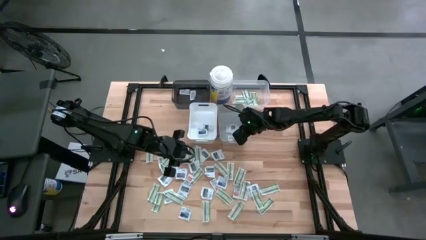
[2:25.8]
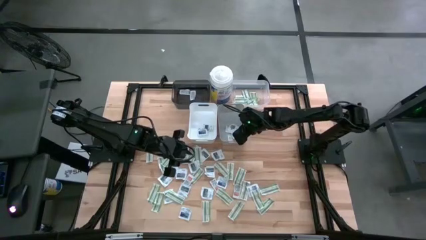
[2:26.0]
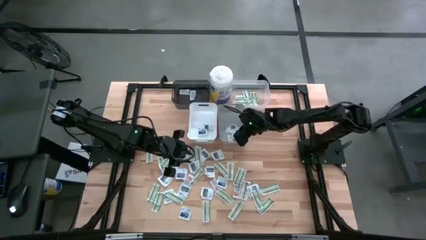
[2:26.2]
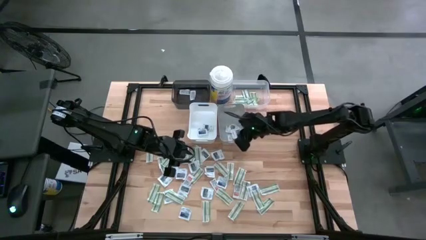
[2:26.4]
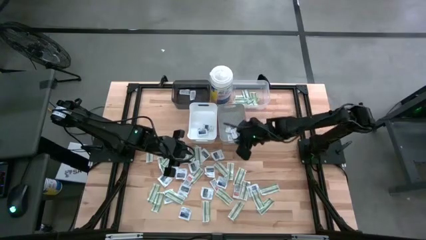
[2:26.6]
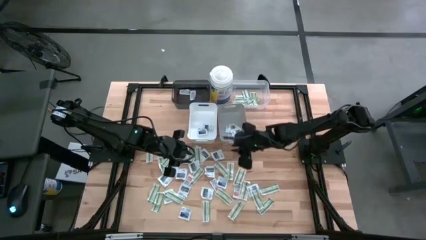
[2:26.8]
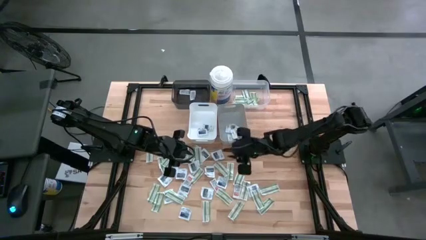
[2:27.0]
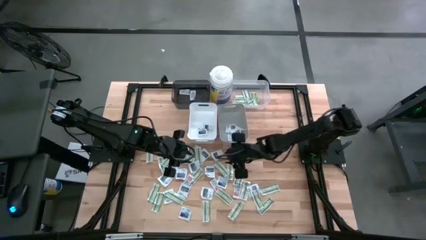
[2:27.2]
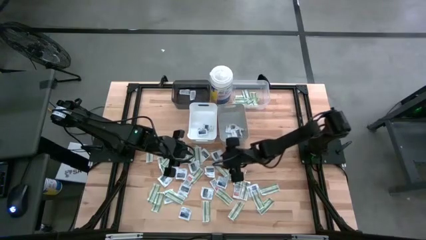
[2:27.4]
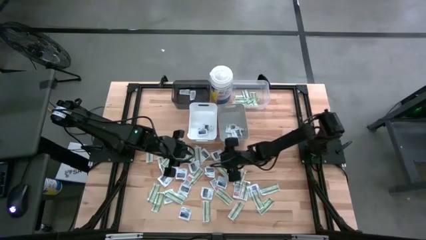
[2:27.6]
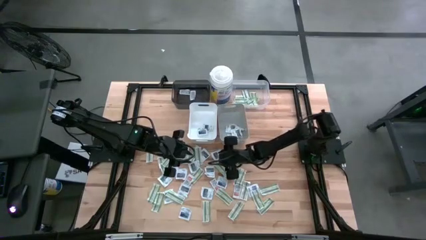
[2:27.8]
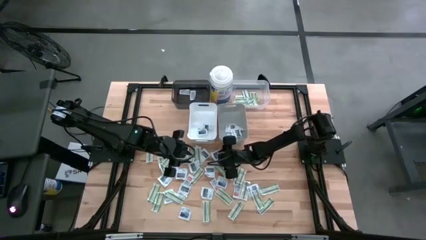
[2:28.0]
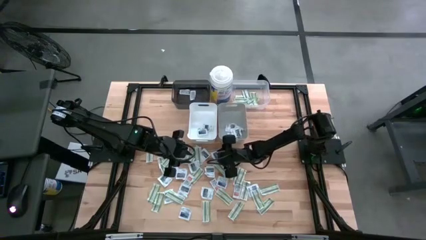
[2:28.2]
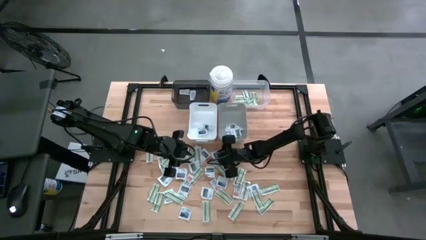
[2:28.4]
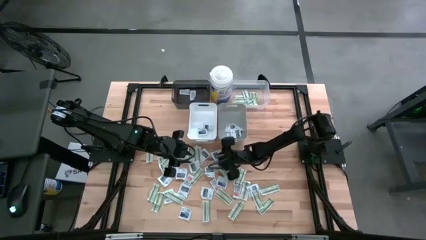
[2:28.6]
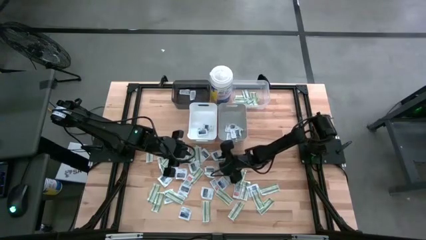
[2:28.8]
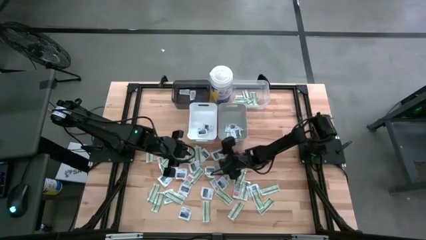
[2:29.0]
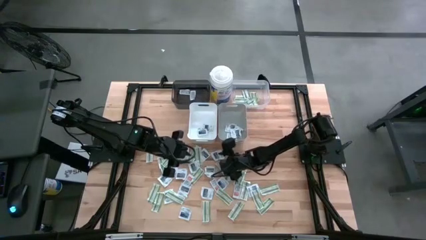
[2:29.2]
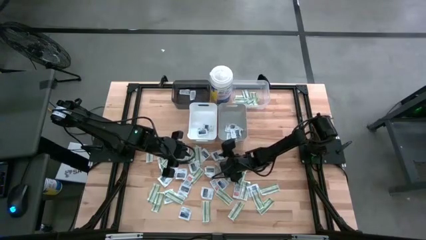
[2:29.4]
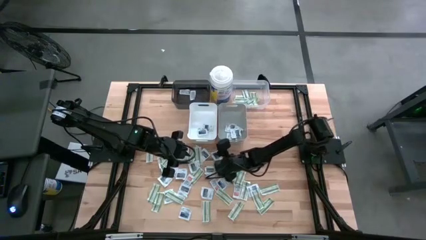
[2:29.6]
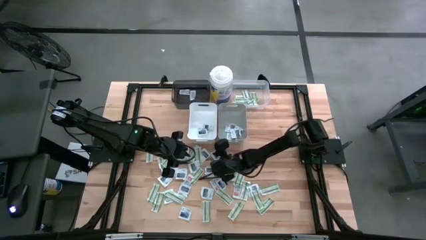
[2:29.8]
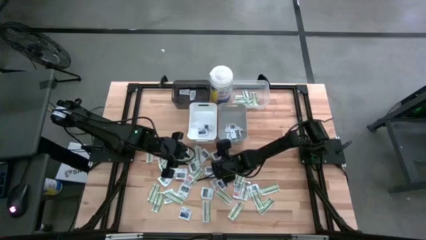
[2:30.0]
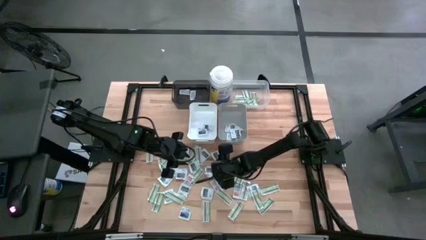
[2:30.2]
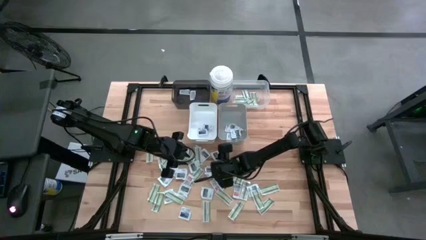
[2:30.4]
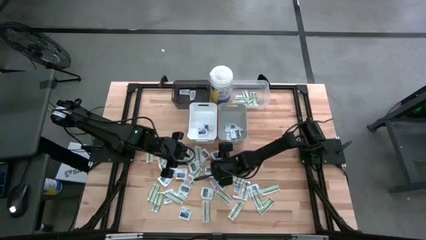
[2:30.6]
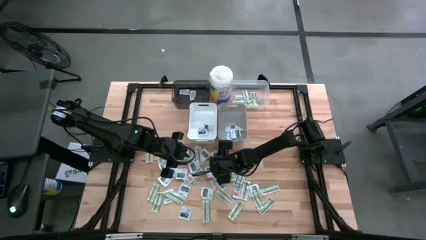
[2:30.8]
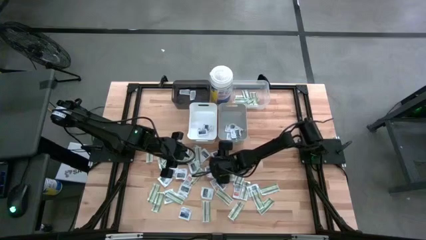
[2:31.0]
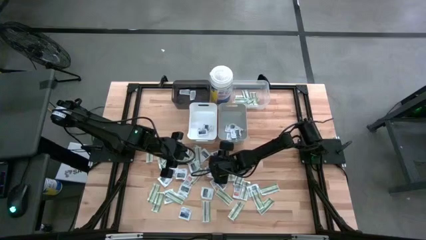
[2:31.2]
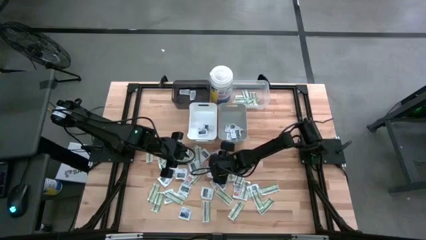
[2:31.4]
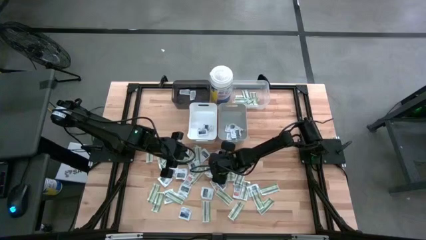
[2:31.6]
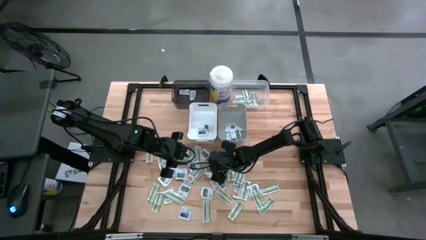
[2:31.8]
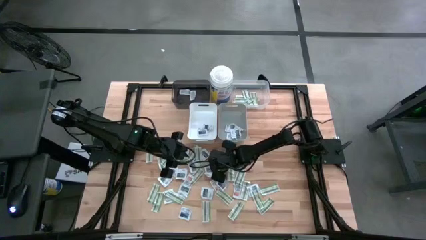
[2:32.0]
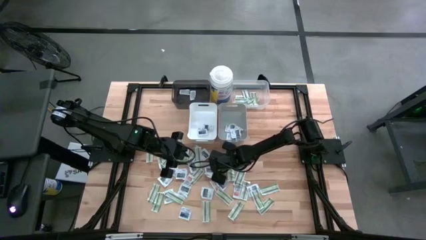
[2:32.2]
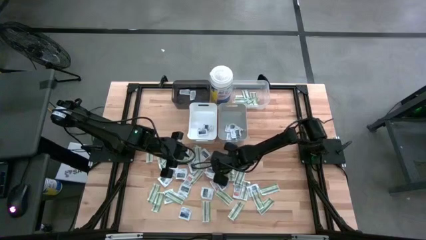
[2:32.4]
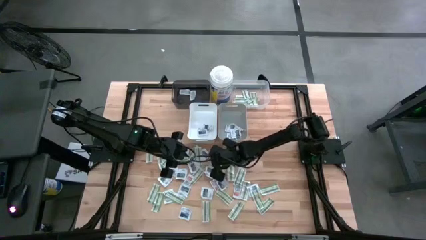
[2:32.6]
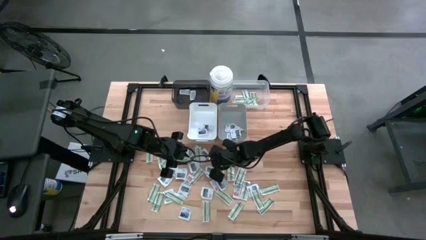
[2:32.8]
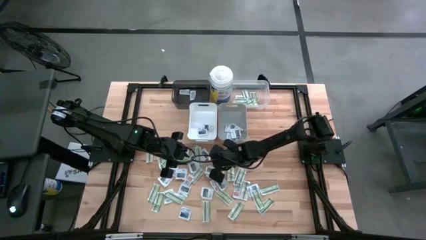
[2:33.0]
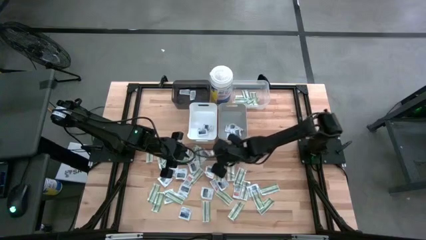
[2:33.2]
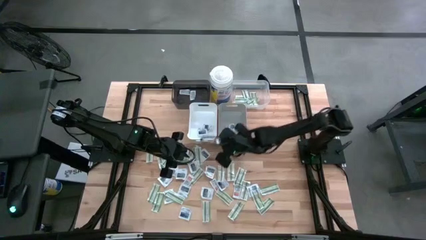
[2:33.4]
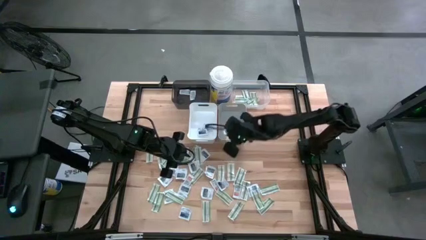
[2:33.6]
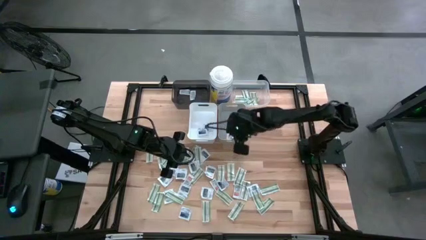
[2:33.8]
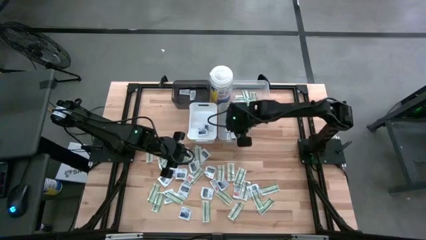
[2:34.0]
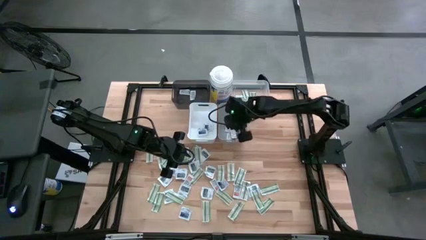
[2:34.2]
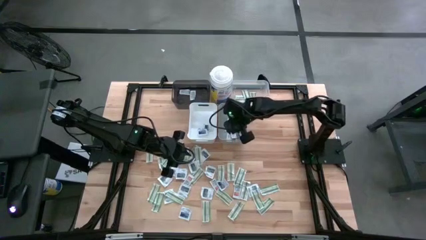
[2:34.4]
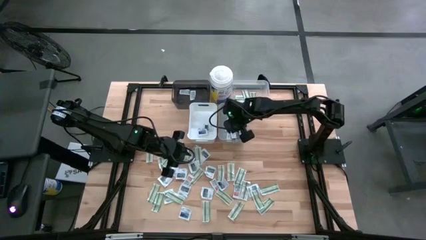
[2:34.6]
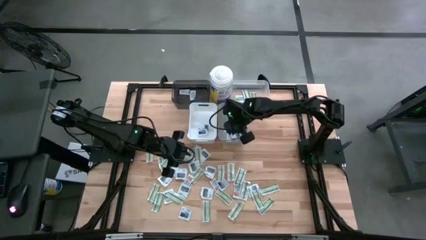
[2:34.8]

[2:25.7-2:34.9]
Task: Pick & Place First Aid Supplies
Put the wipe into the gray bin

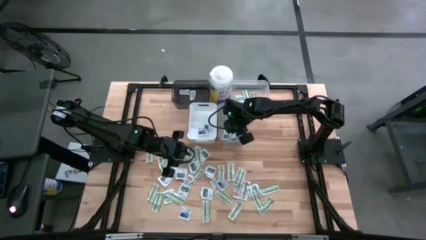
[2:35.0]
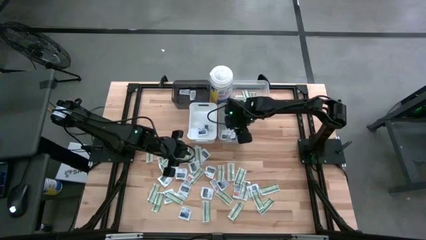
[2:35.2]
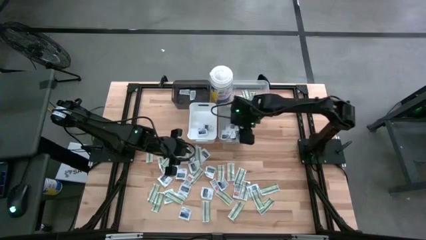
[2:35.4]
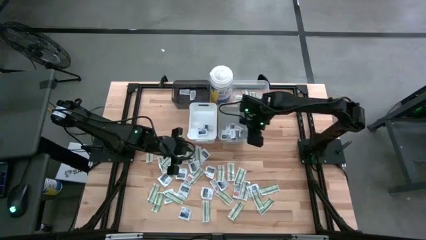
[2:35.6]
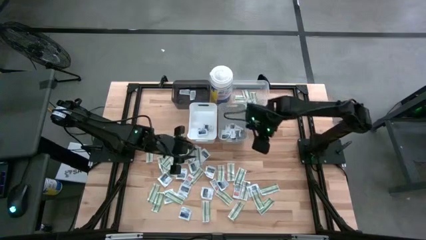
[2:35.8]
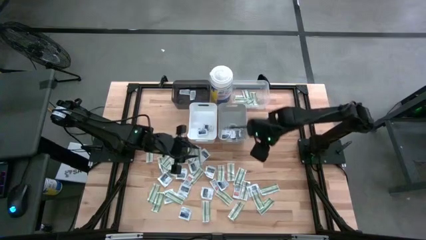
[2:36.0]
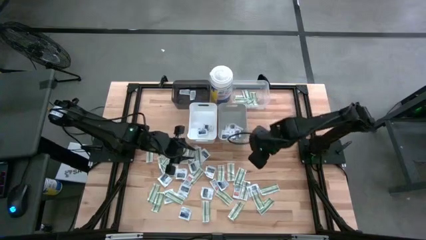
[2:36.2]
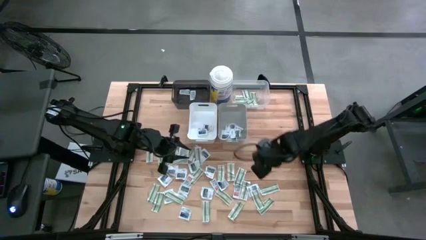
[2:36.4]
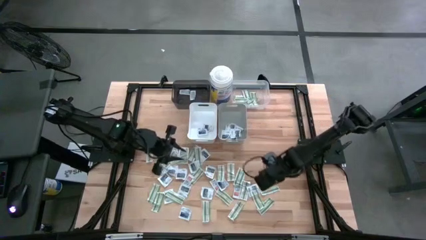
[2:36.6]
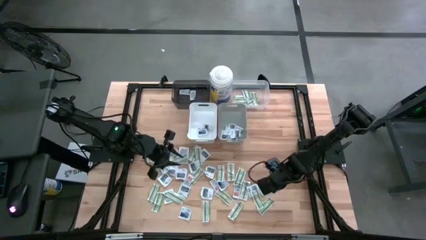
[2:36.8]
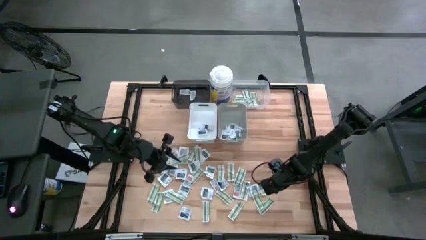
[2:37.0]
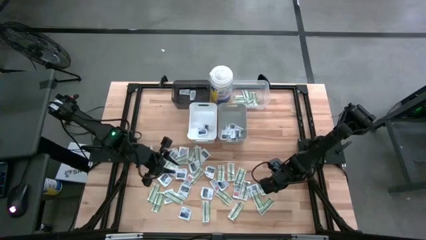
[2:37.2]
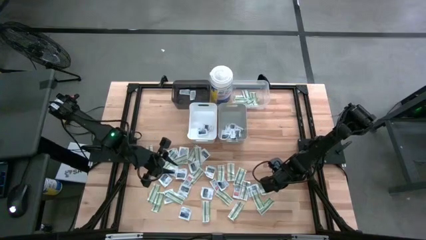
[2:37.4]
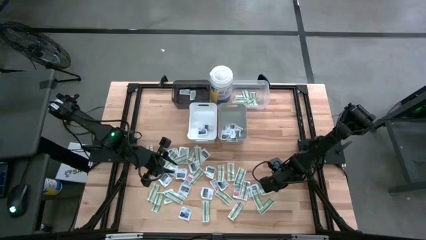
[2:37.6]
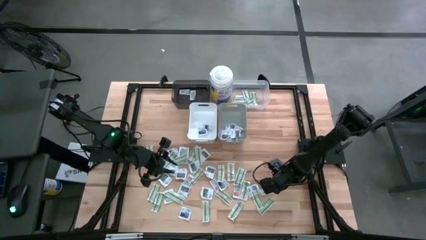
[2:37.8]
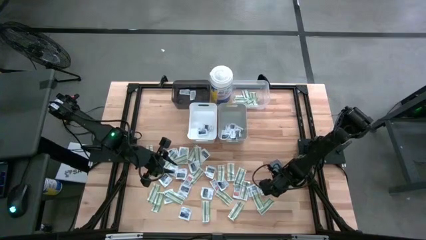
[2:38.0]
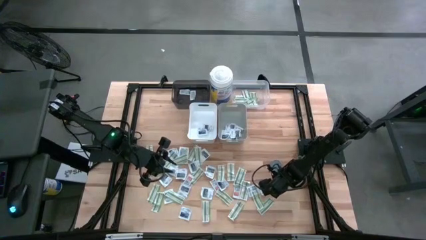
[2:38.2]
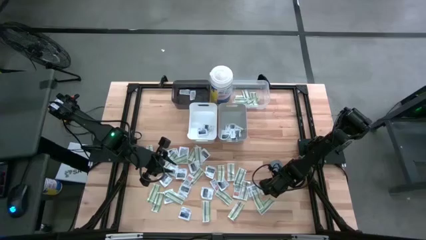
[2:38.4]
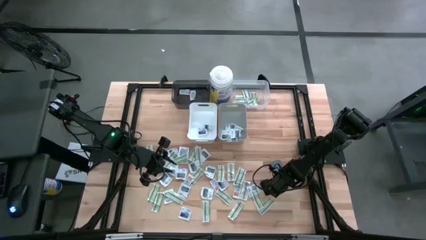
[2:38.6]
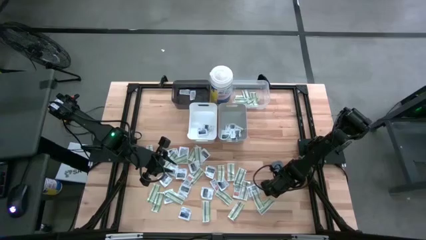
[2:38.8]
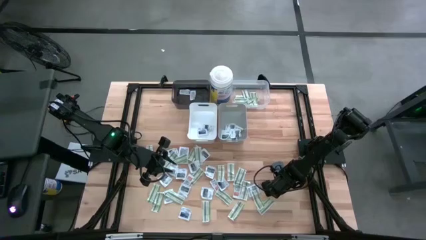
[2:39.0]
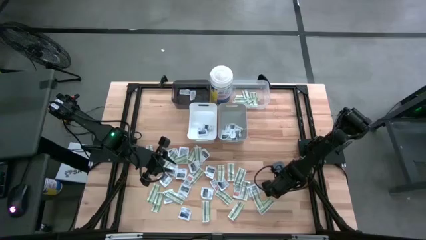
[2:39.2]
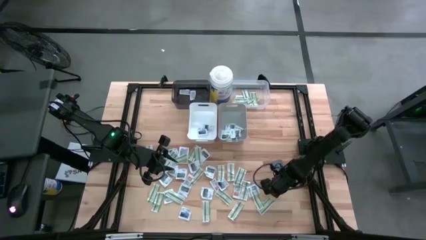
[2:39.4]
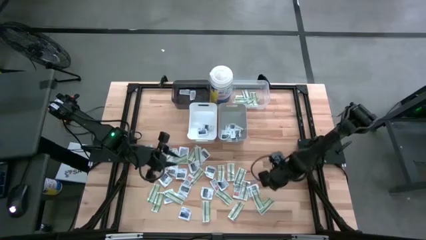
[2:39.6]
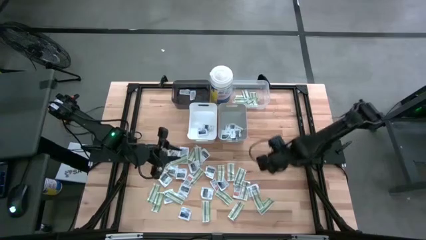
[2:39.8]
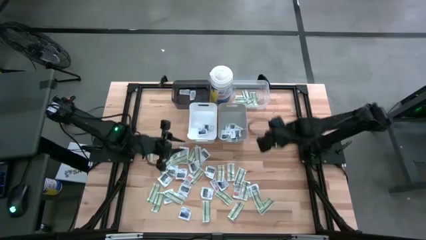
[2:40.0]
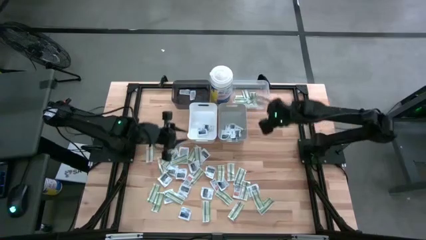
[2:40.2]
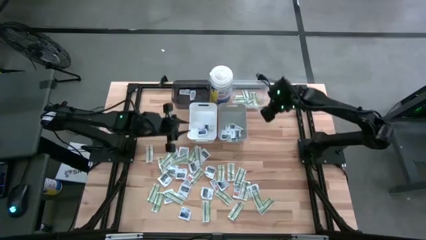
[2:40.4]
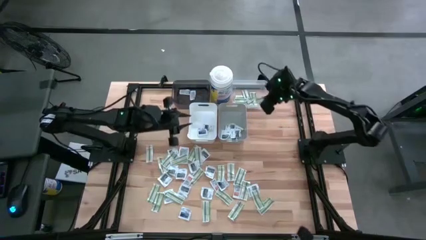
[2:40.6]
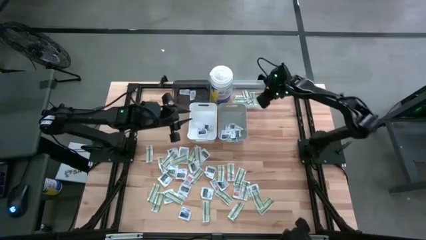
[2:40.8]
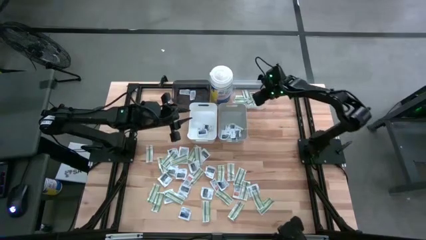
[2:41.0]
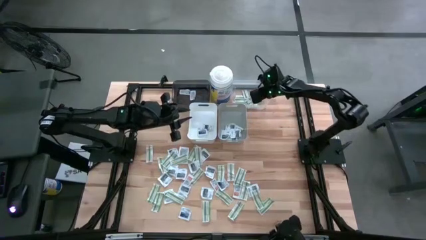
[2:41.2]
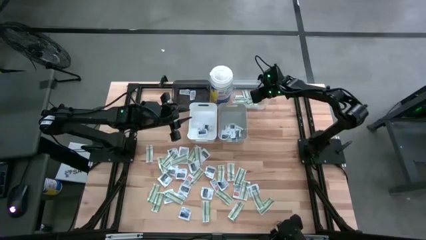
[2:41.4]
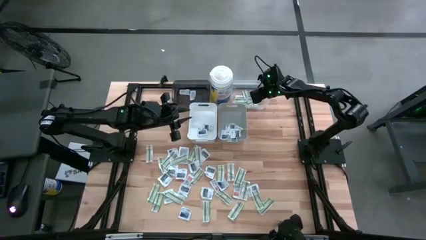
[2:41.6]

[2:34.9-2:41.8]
Put the band aid into the transparent bin
